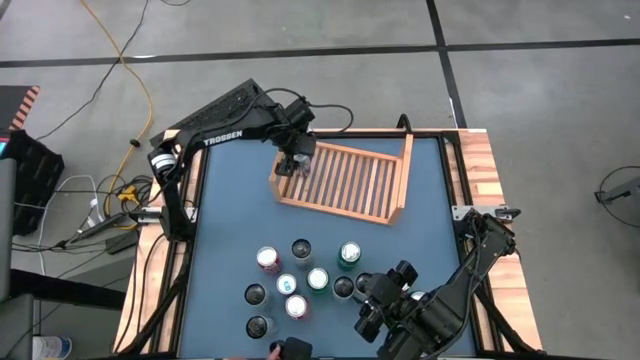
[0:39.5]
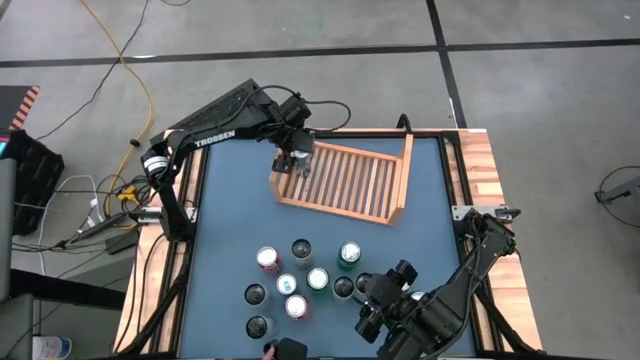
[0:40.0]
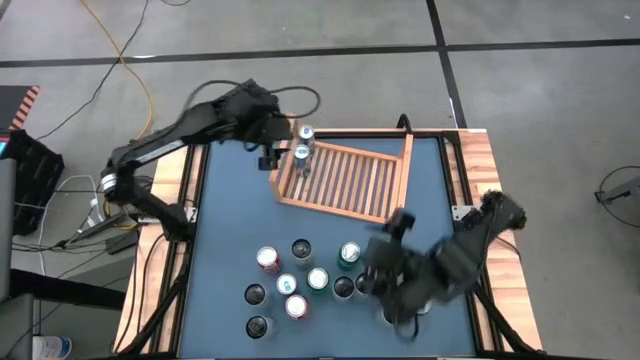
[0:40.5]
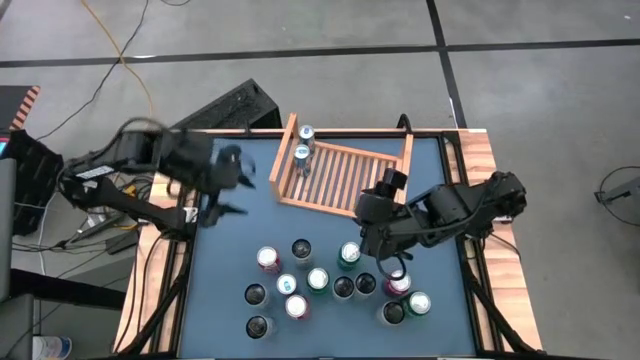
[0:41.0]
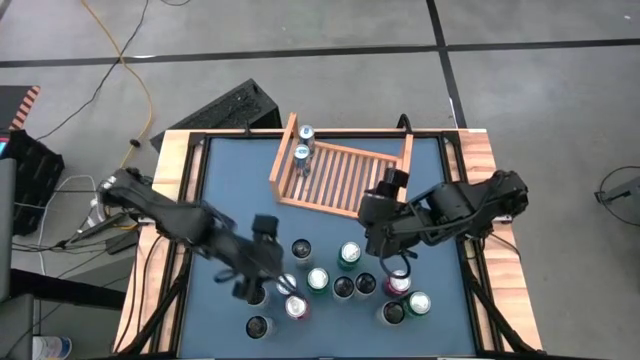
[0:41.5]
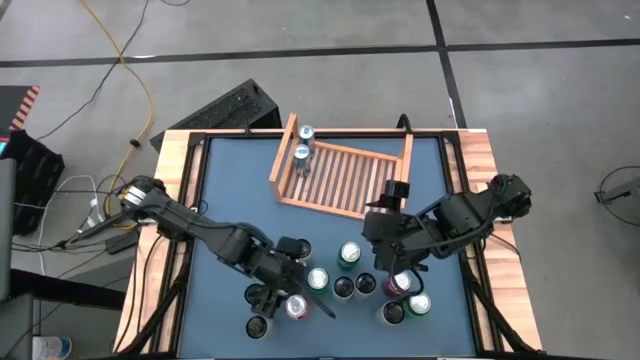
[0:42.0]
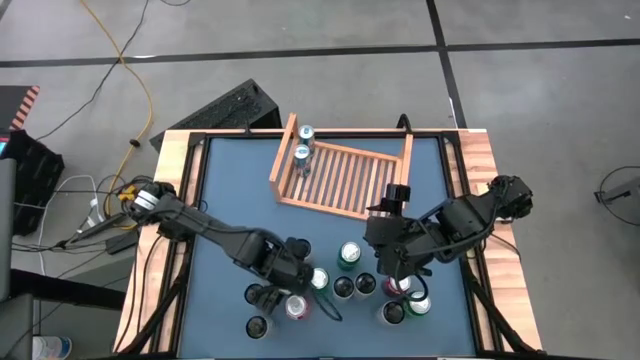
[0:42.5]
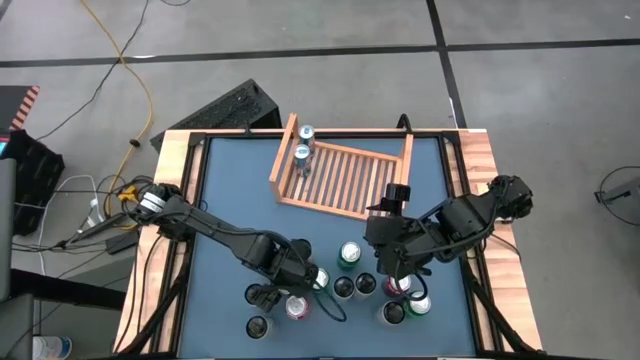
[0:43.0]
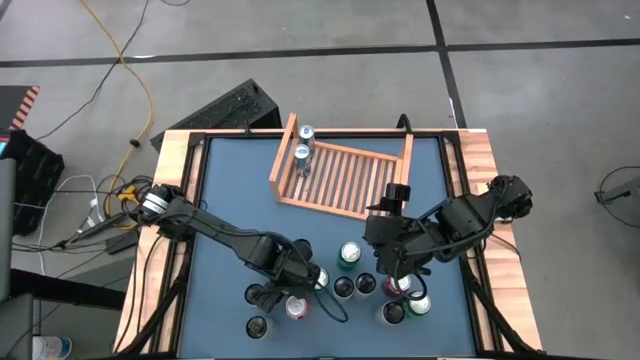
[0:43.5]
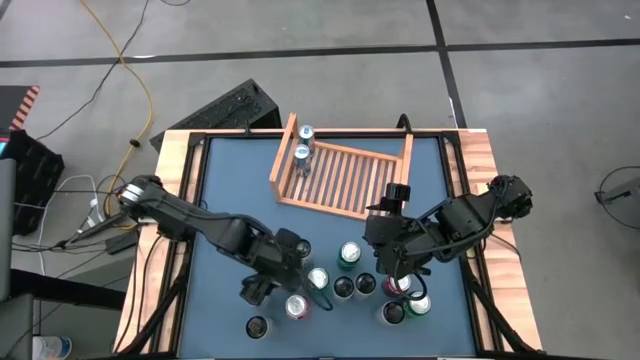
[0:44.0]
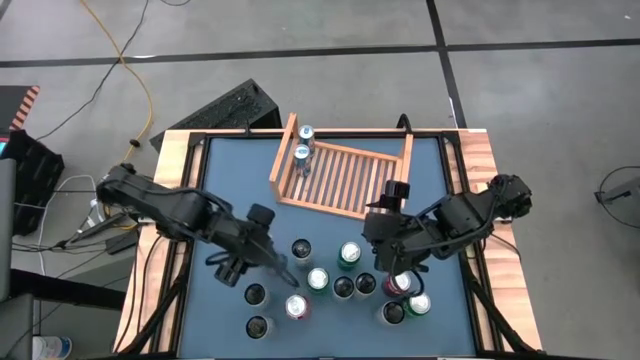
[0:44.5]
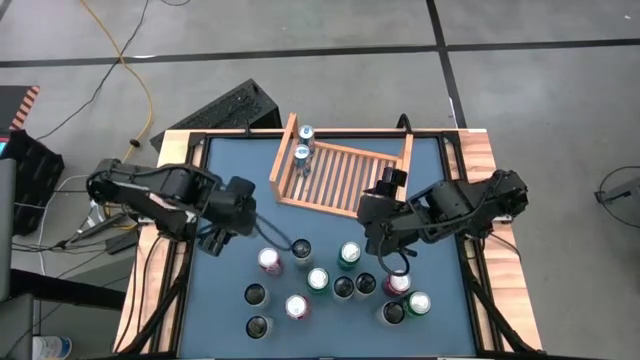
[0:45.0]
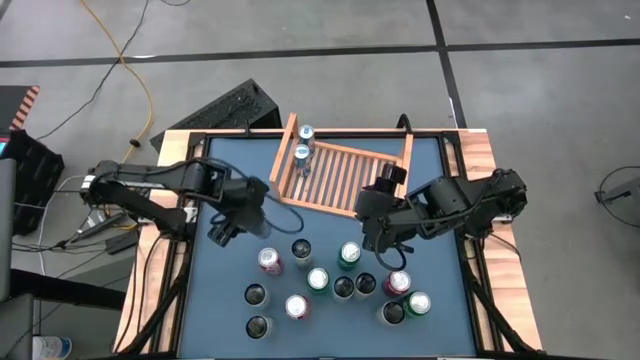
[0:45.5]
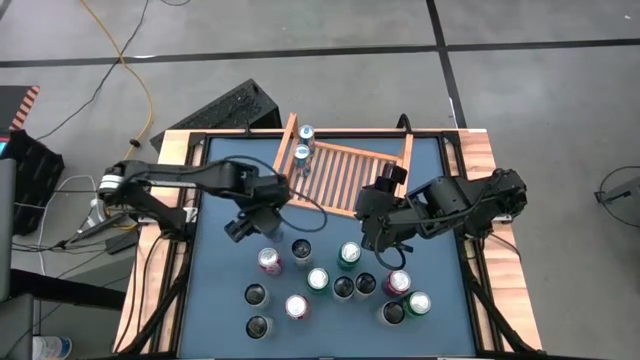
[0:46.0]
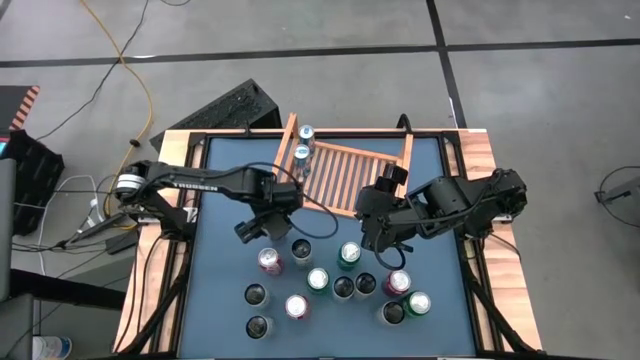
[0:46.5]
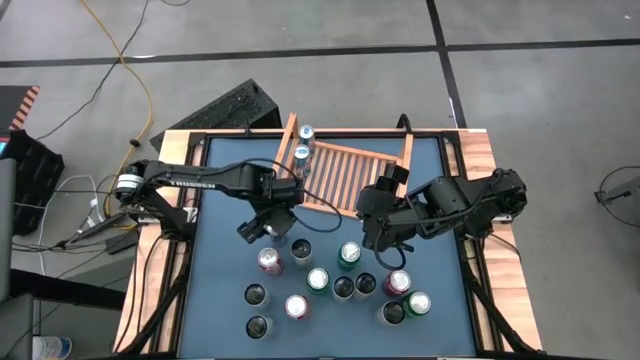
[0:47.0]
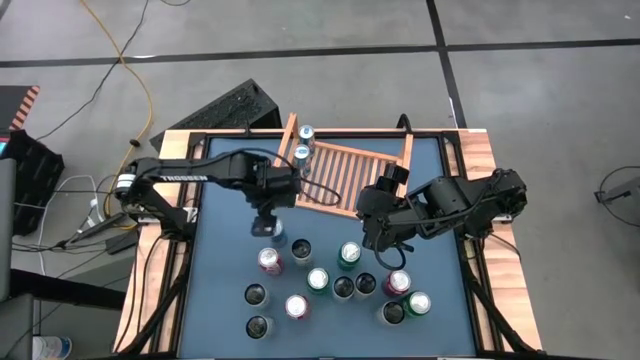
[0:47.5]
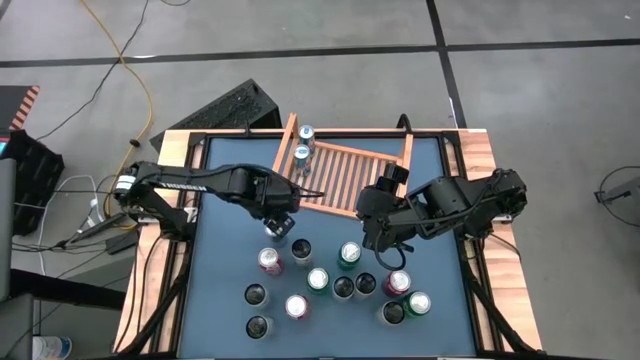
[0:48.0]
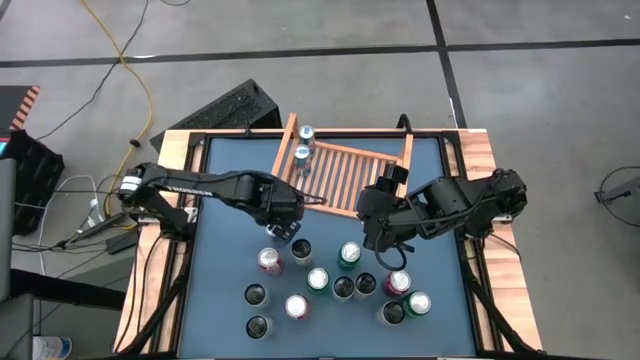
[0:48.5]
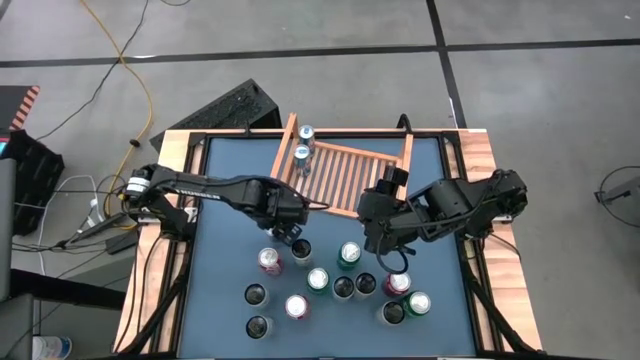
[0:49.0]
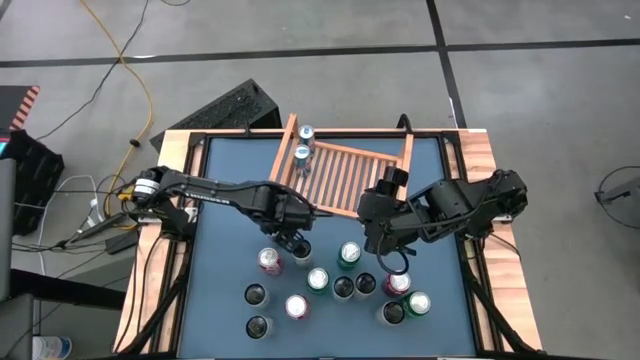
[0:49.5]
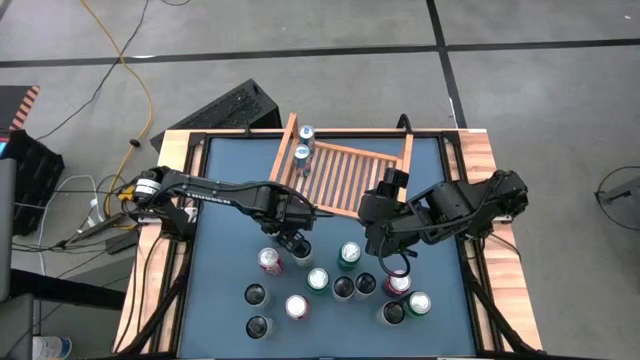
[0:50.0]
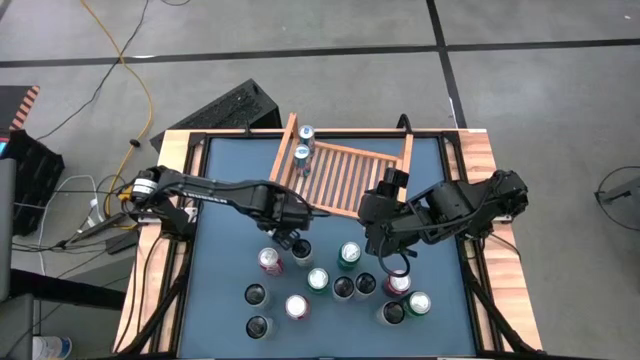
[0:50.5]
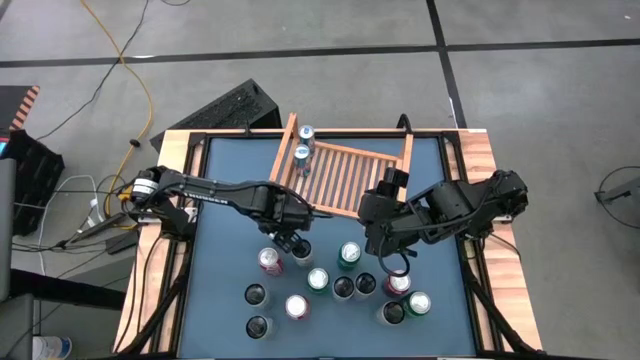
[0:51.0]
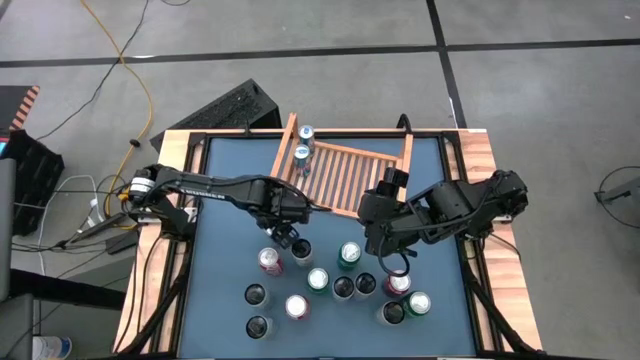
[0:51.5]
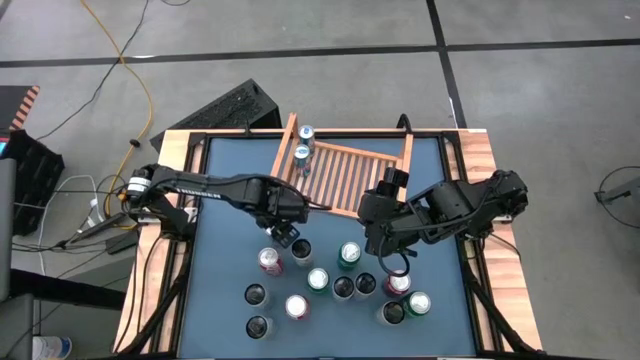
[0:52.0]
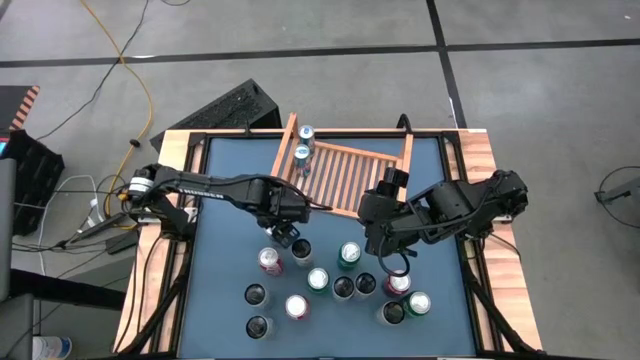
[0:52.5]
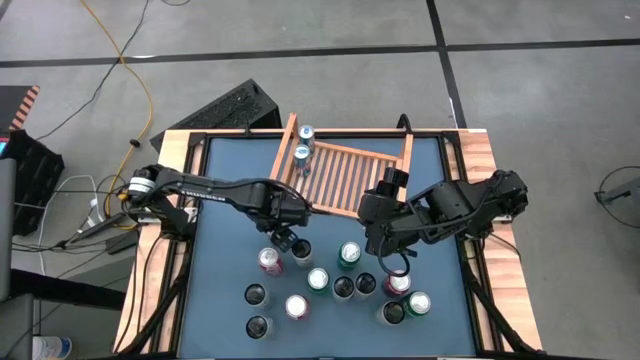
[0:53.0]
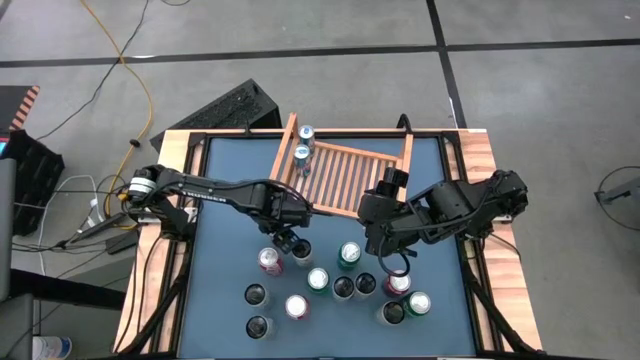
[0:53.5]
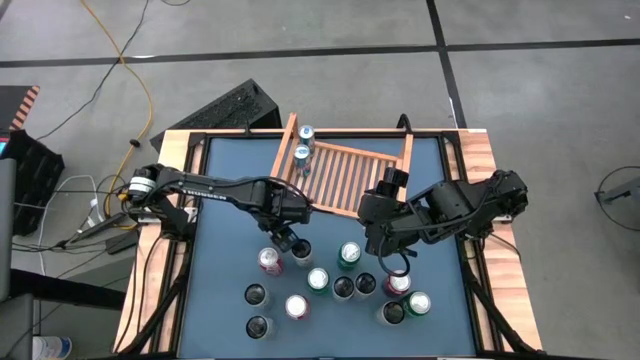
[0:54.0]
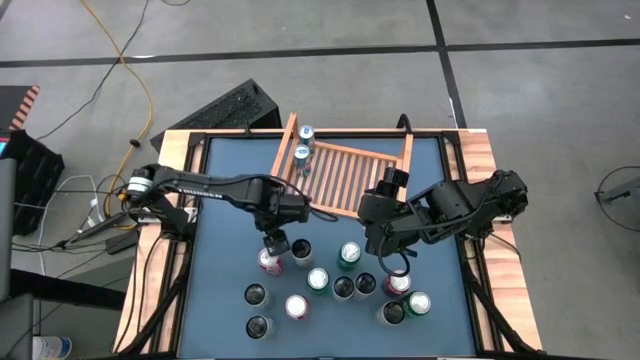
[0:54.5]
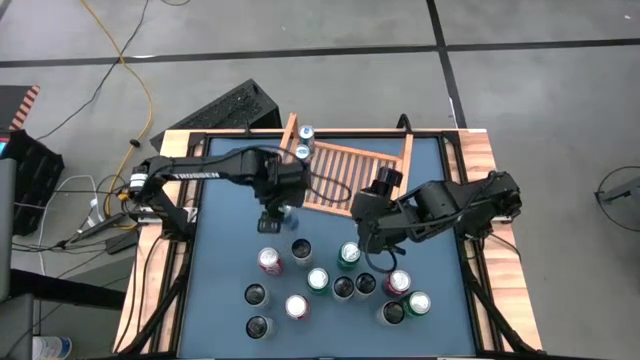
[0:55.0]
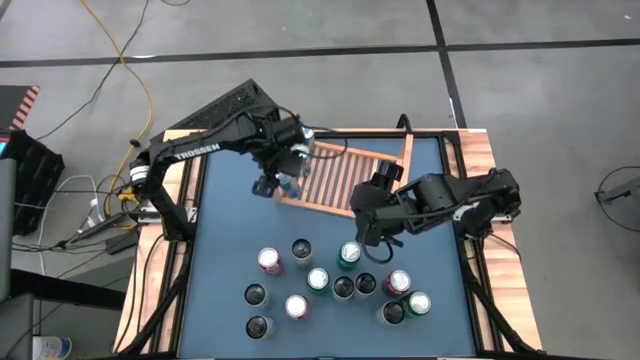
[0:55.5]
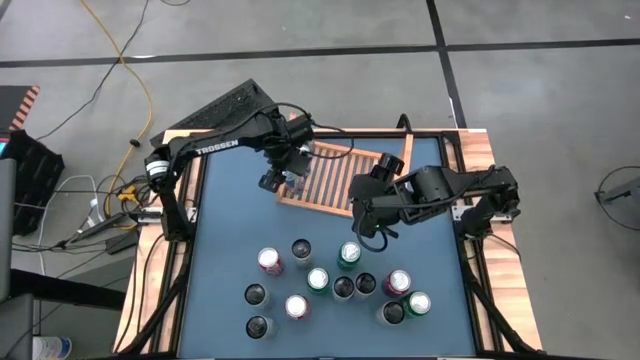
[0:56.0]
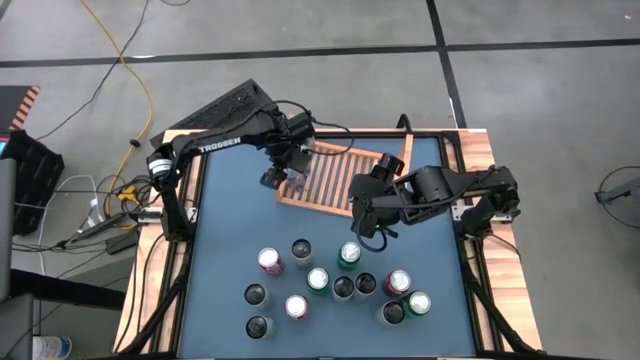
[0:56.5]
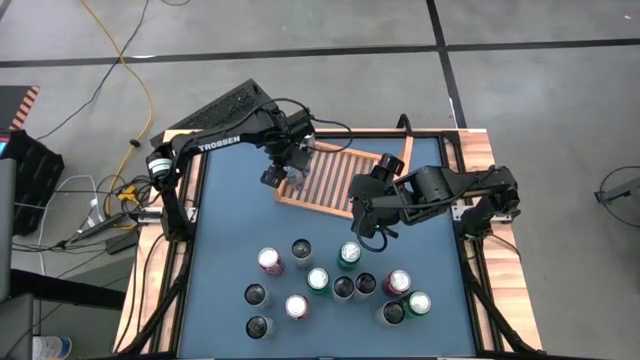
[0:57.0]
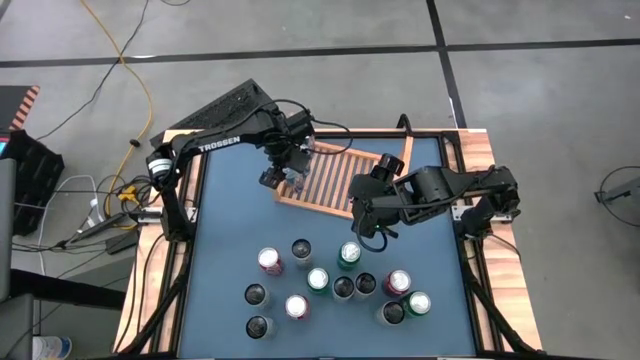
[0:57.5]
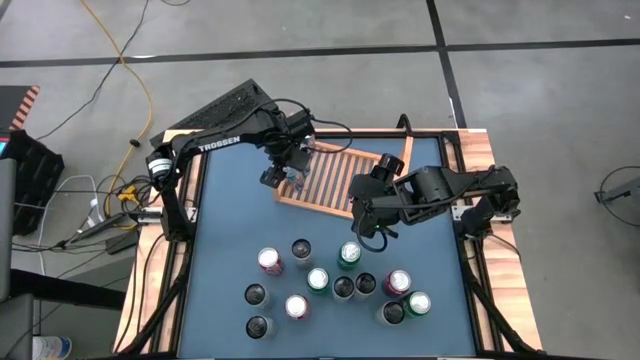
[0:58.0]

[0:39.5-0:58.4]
Task: Place canned beverage on shelf
Put the blue soda can on the shelf

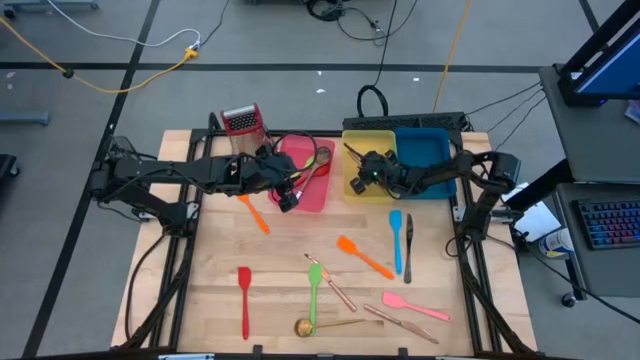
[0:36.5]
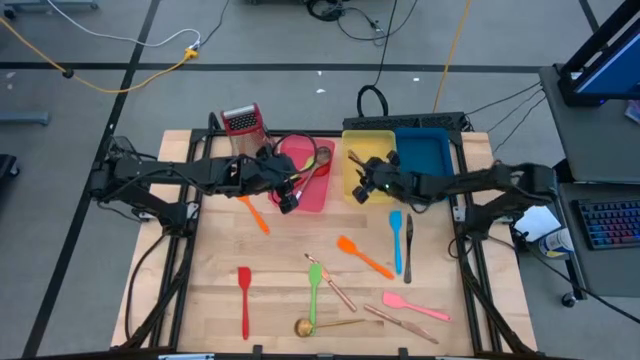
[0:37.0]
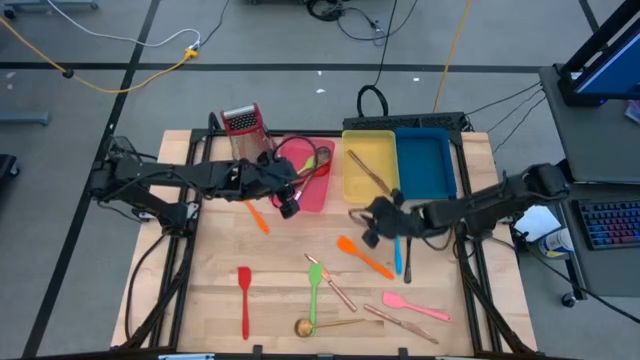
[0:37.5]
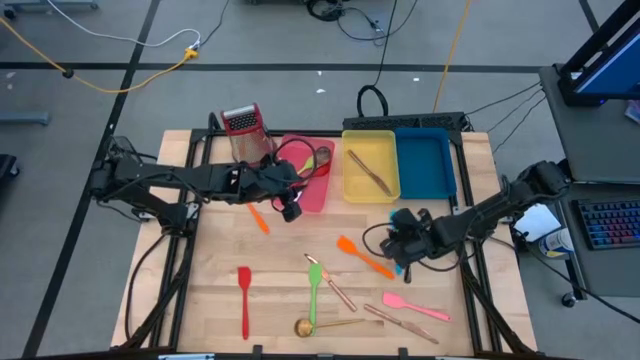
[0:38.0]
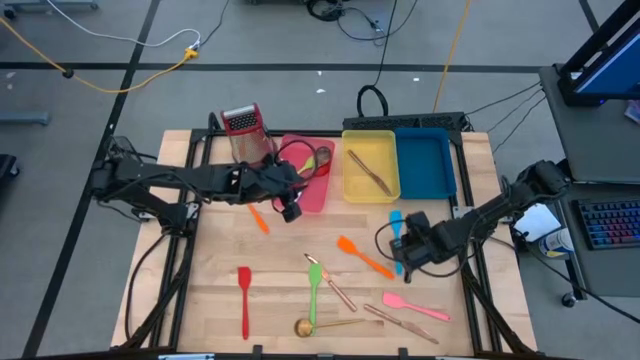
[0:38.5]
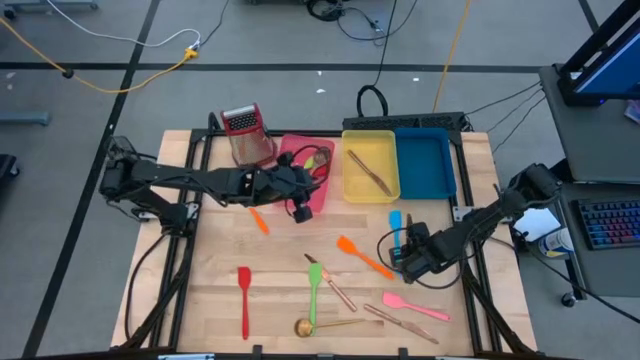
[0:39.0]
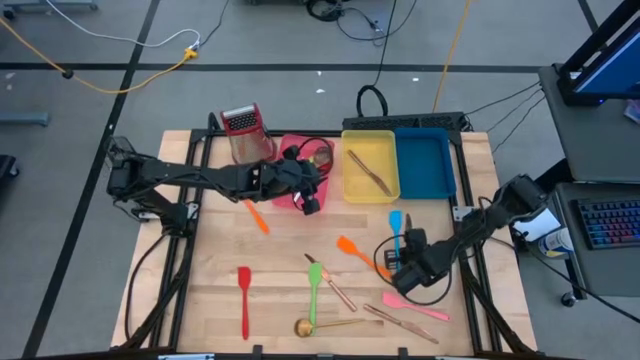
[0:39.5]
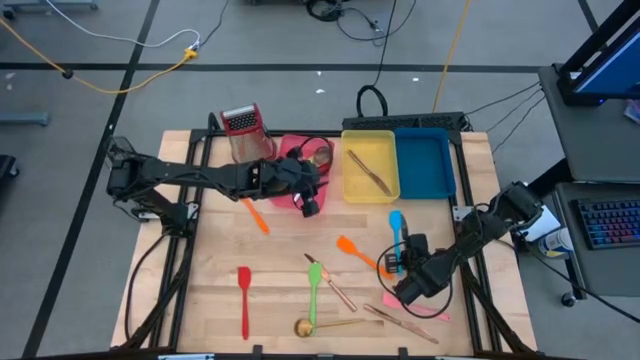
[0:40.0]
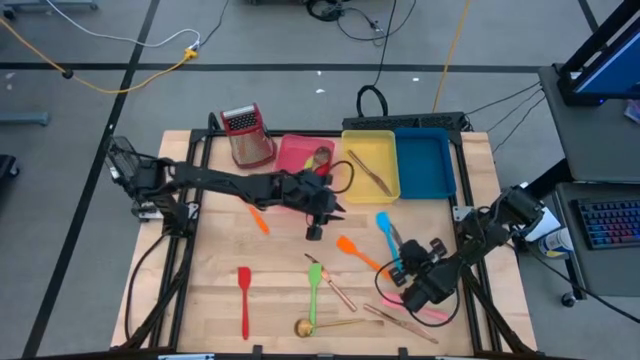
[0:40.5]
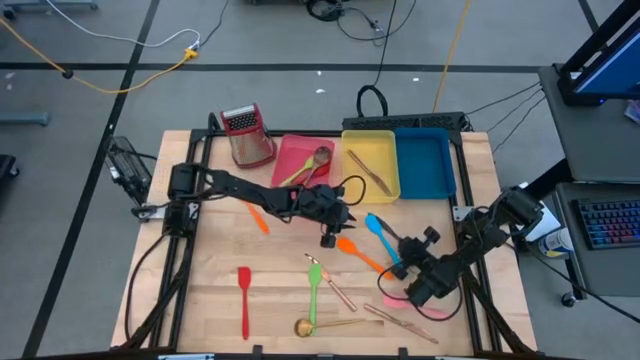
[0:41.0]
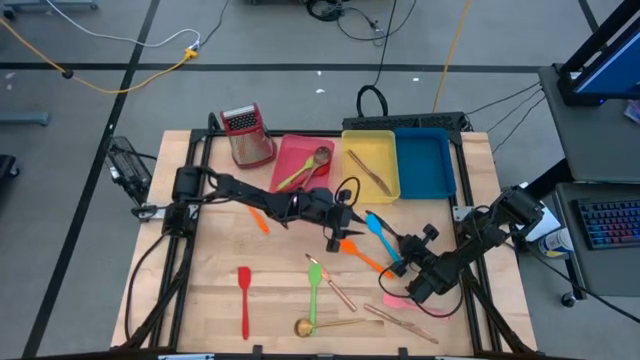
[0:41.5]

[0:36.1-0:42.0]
Task: Pick & Place Kitchen Items
Put the black table knife into the yellow bin
